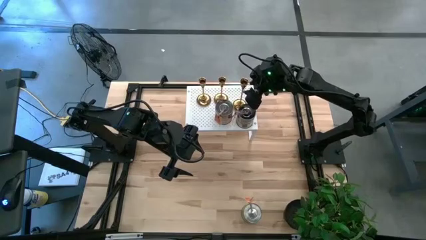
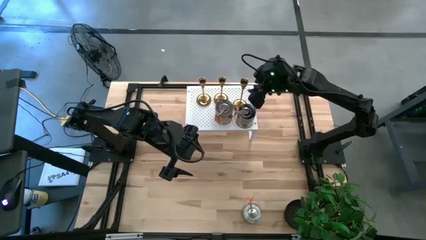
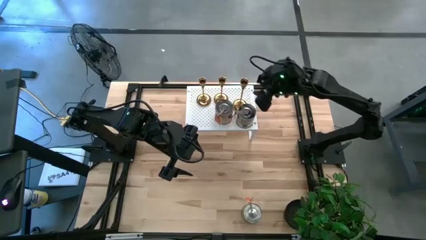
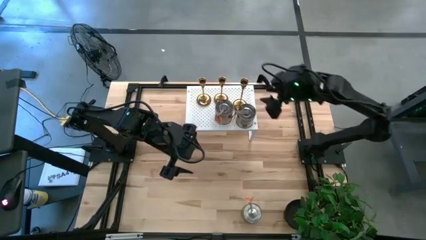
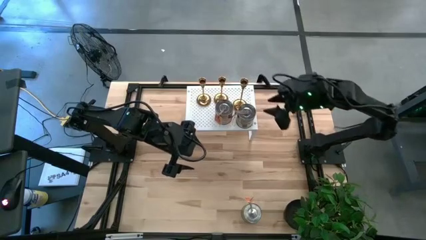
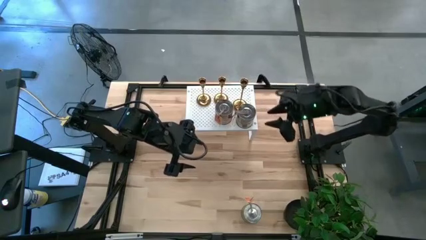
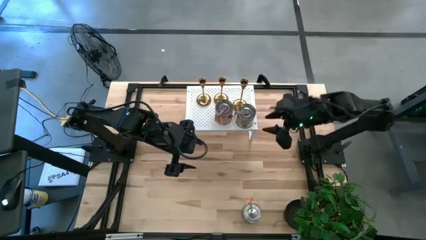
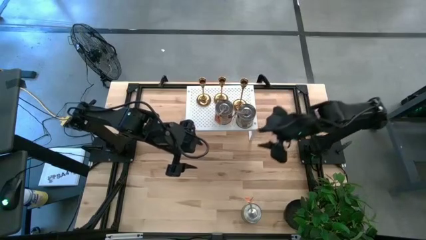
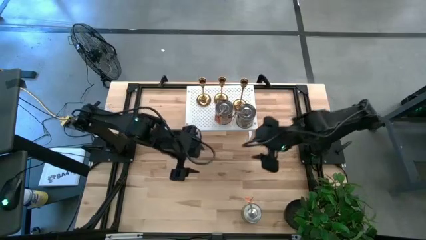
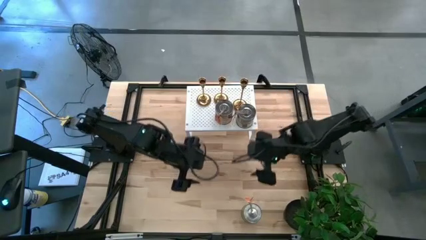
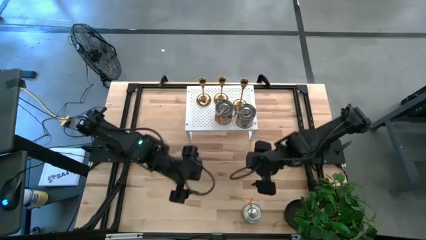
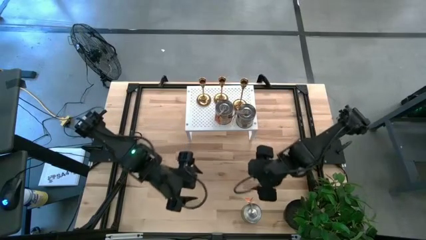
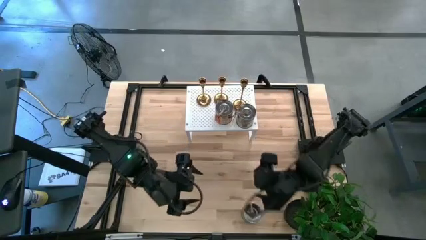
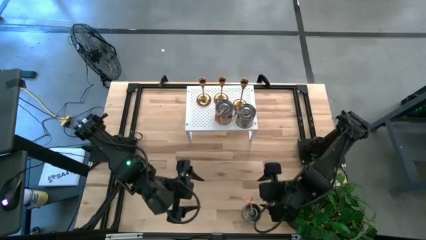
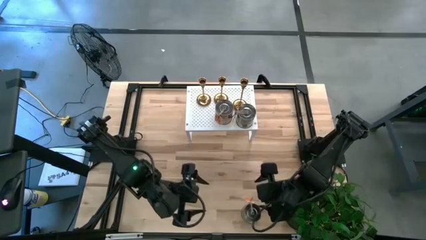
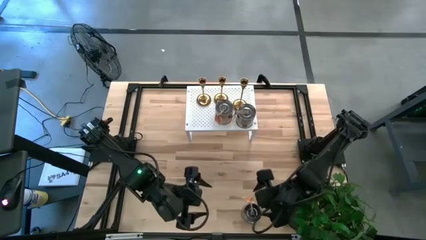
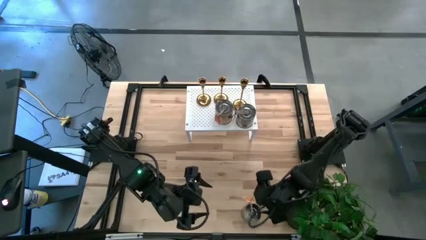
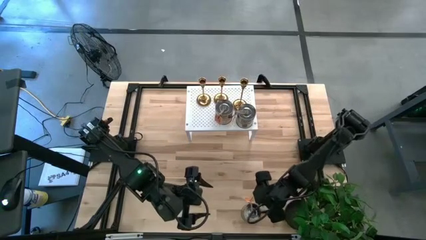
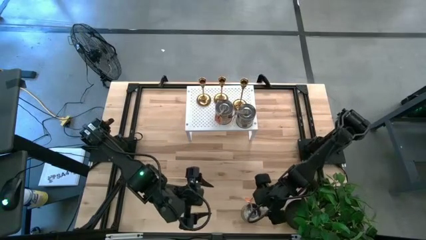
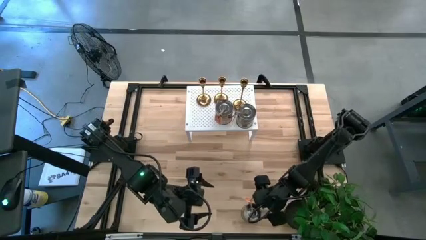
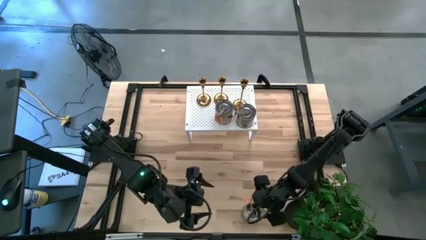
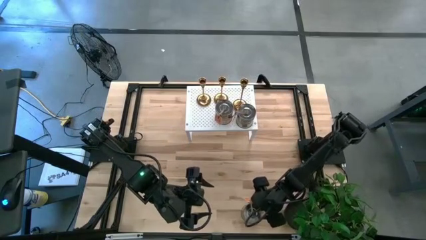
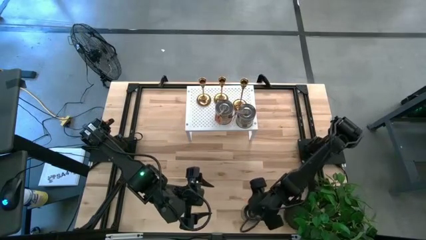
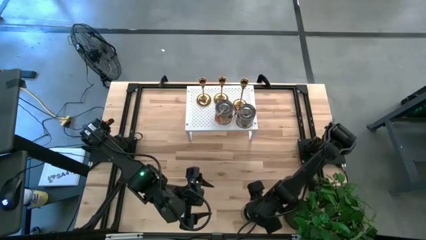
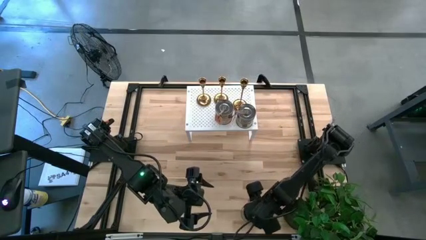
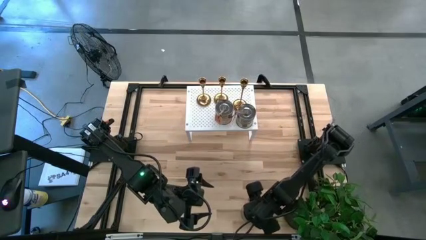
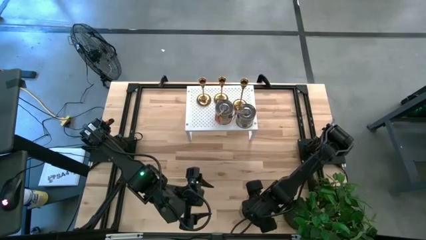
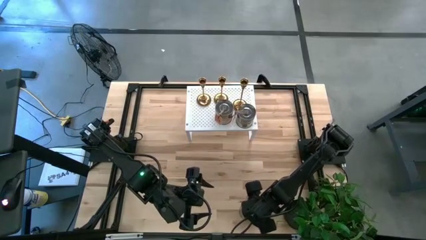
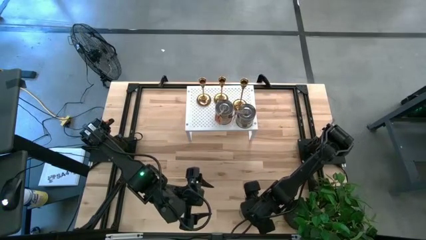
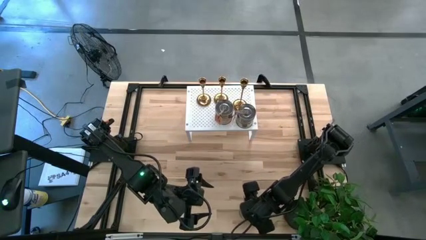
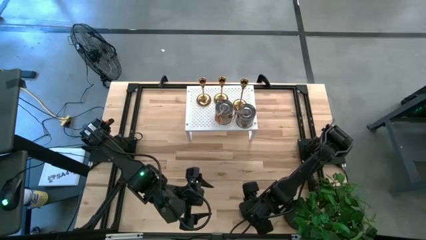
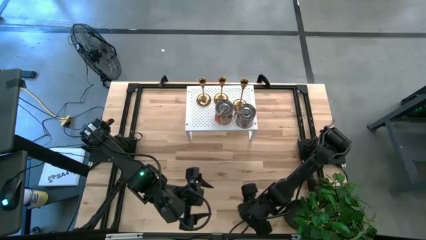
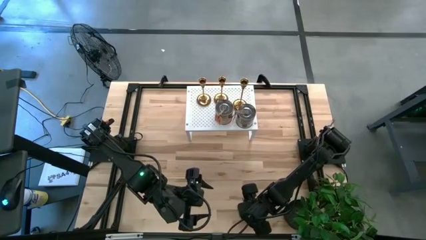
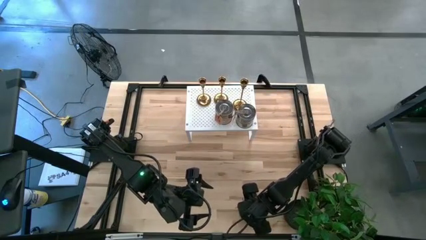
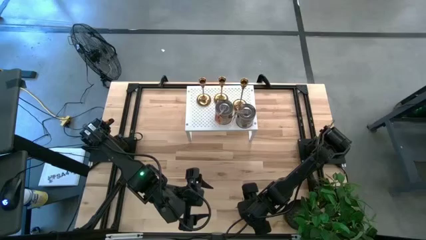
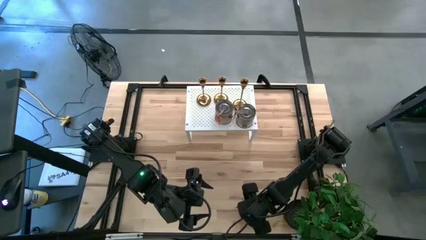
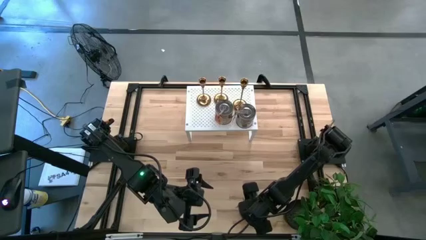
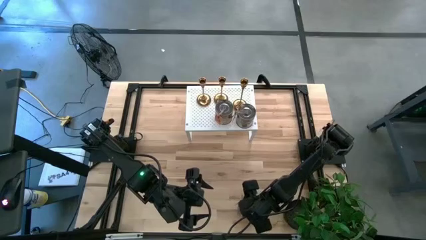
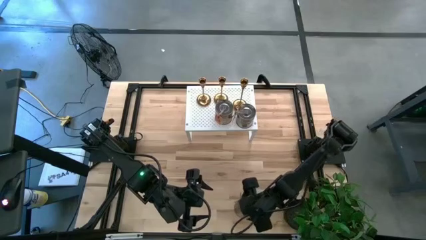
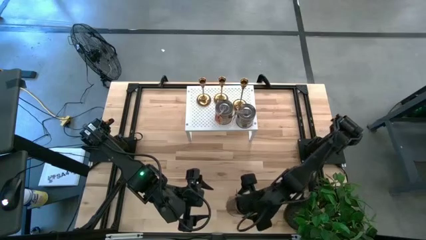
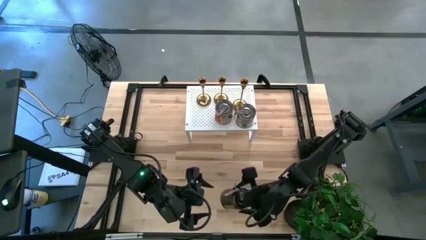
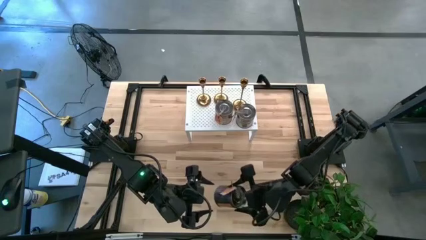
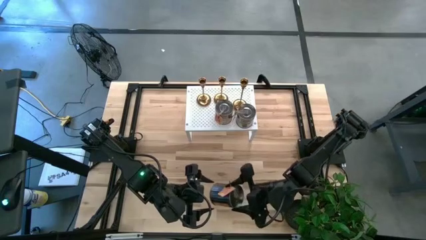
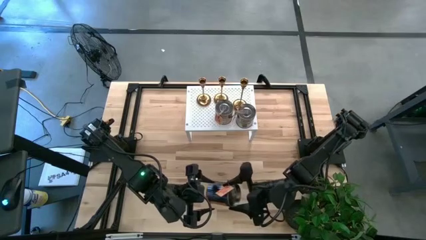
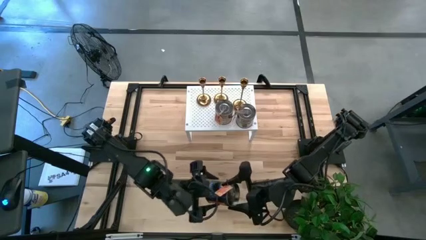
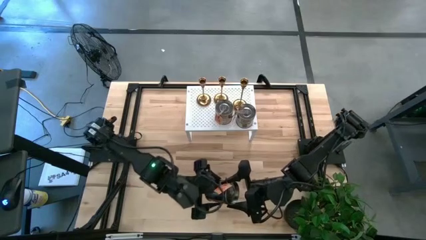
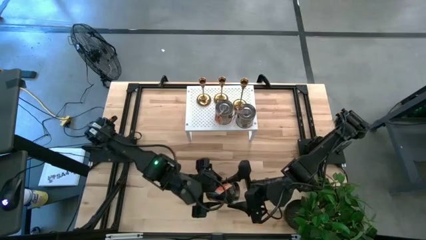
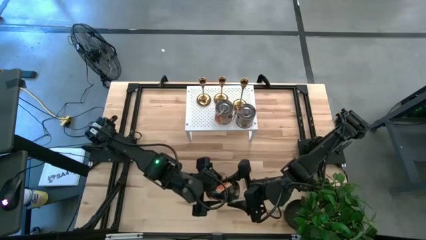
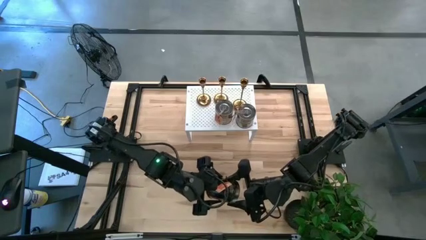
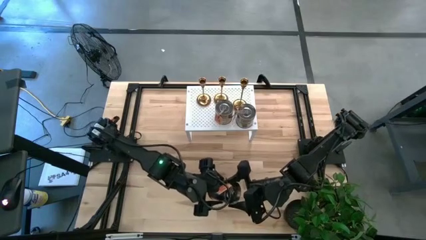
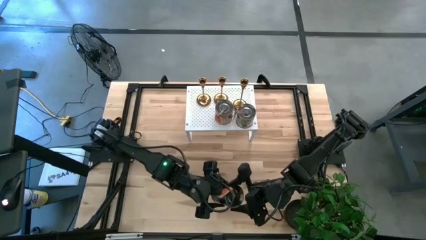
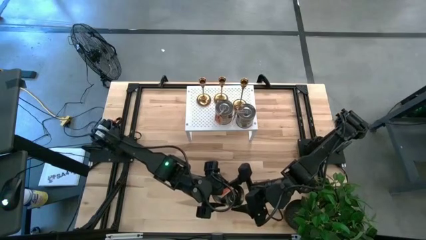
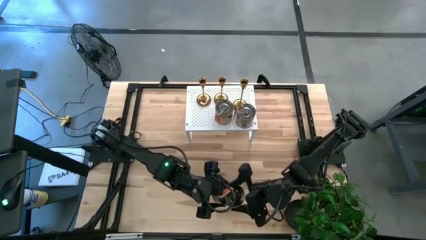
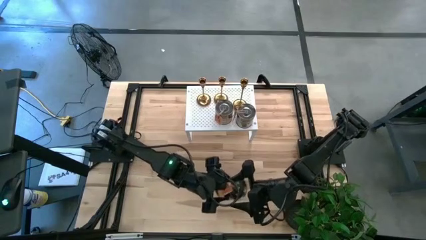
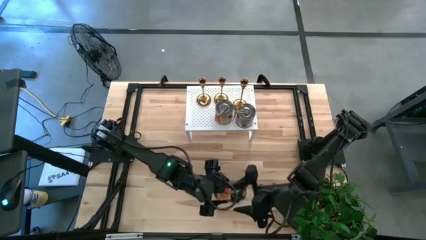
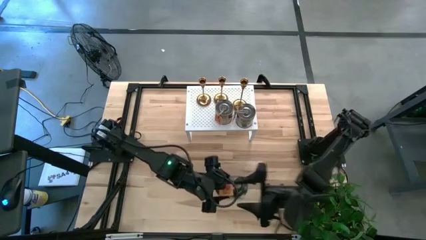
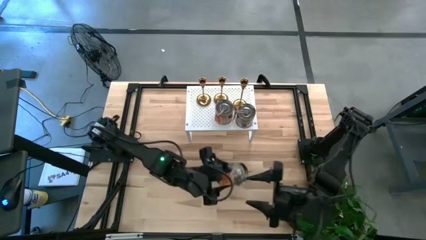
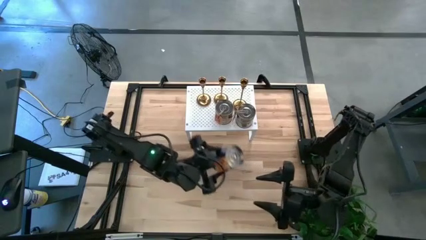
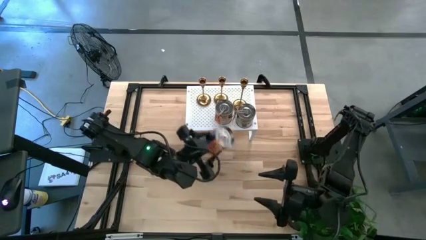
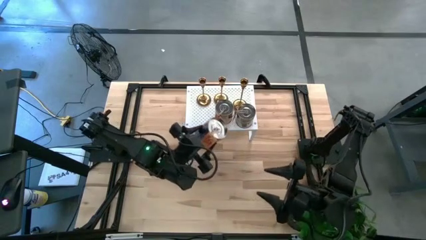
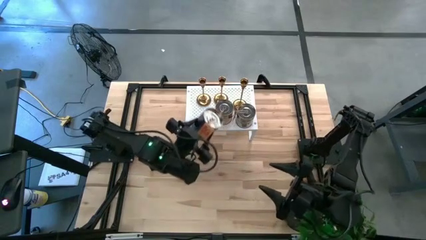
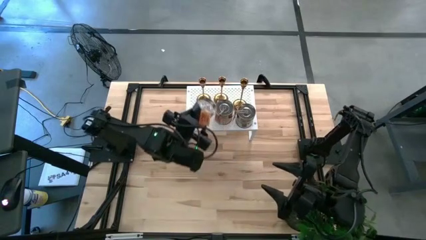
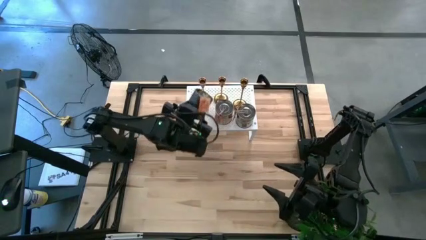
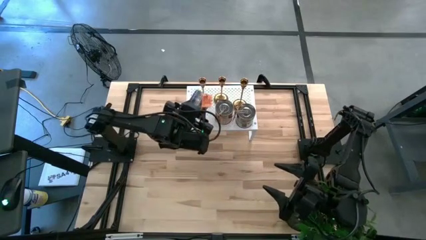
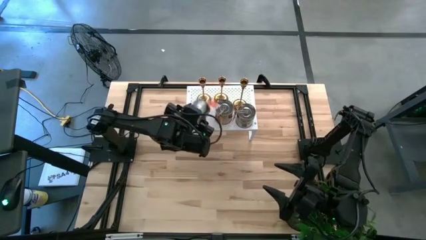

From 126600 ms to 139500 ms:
Task: Pick & Place candle stick holders
Put the silver scented candle on the shelf aligned with the other silver scented candles
